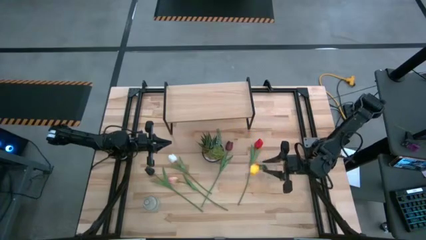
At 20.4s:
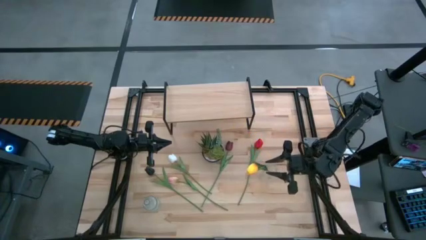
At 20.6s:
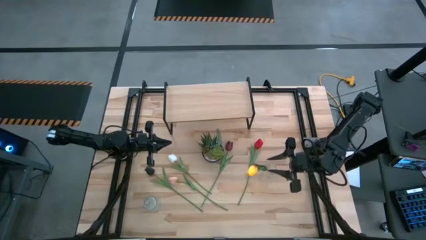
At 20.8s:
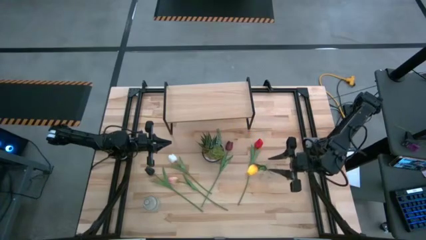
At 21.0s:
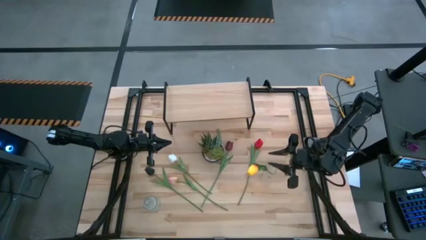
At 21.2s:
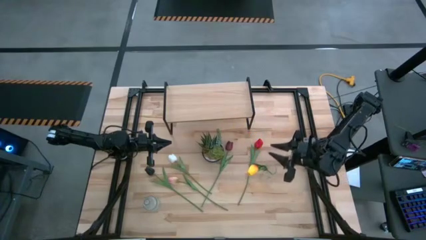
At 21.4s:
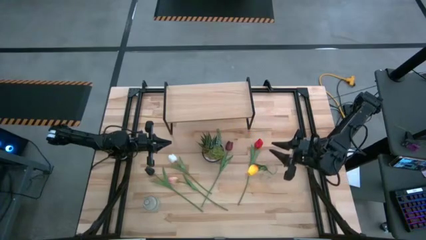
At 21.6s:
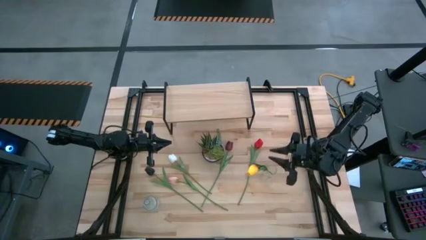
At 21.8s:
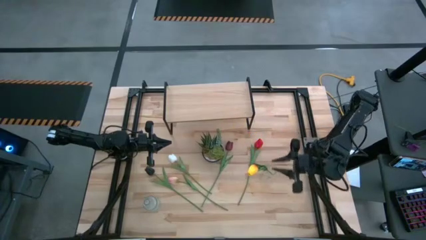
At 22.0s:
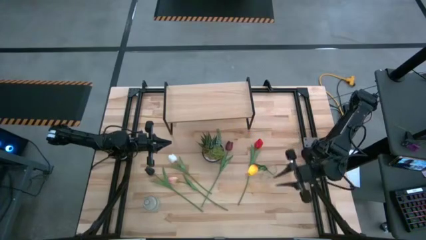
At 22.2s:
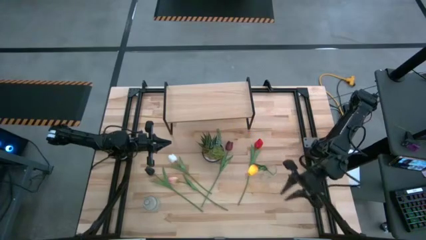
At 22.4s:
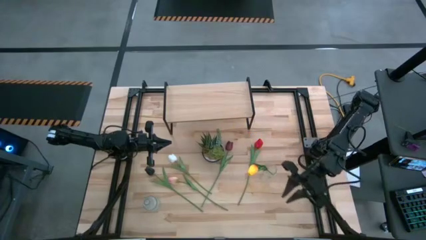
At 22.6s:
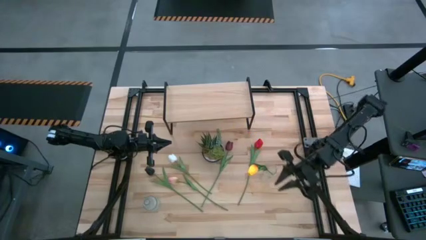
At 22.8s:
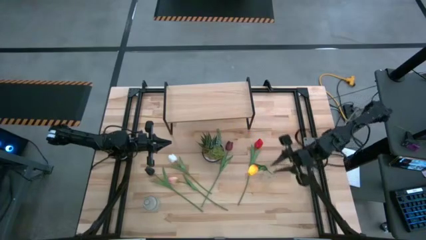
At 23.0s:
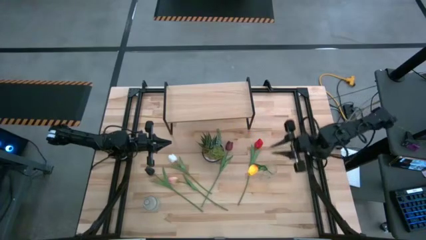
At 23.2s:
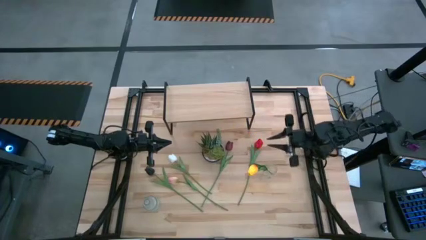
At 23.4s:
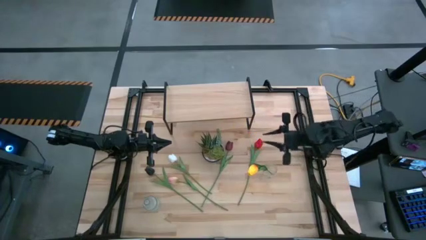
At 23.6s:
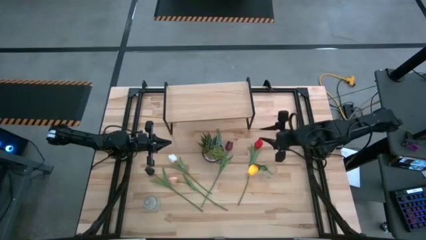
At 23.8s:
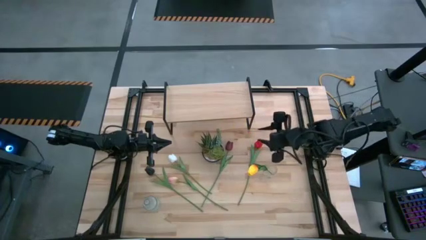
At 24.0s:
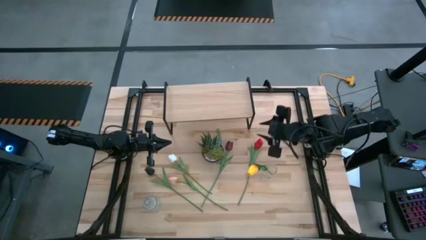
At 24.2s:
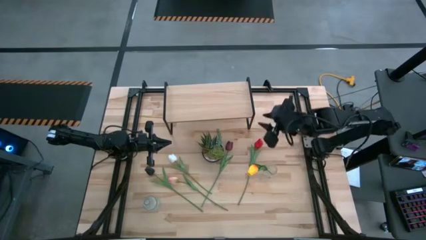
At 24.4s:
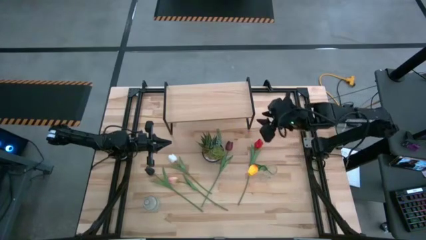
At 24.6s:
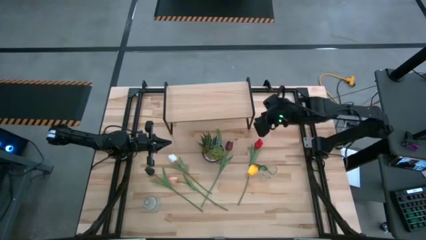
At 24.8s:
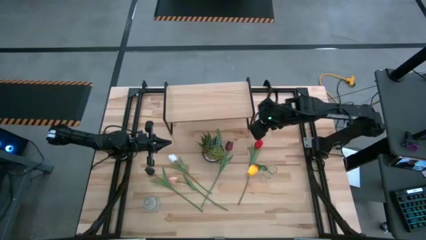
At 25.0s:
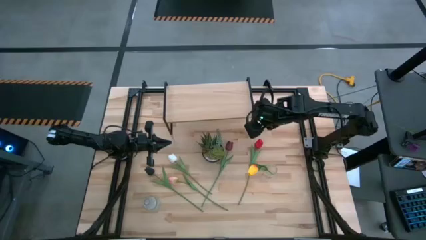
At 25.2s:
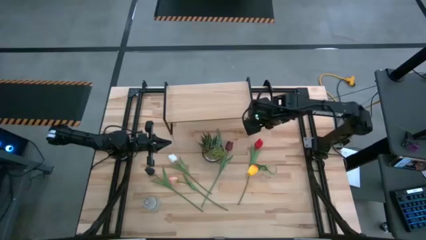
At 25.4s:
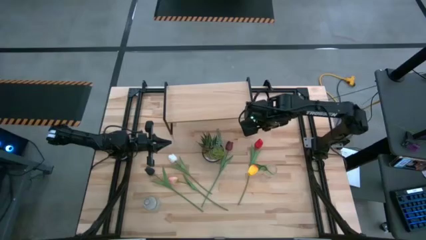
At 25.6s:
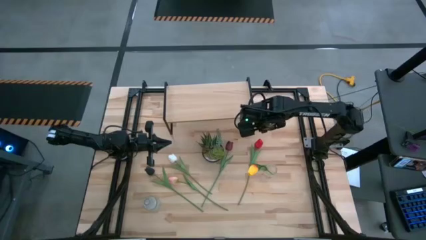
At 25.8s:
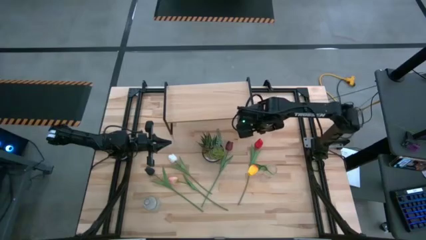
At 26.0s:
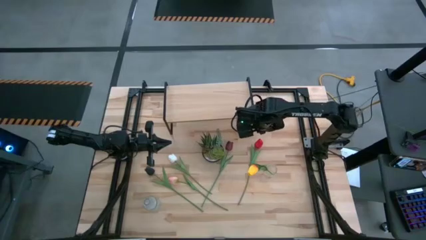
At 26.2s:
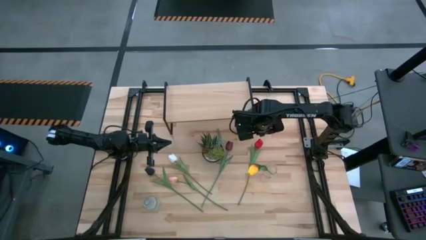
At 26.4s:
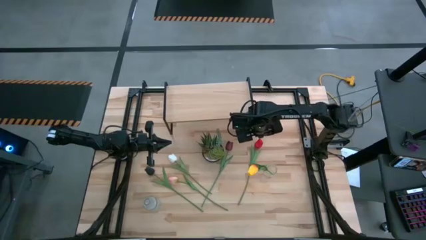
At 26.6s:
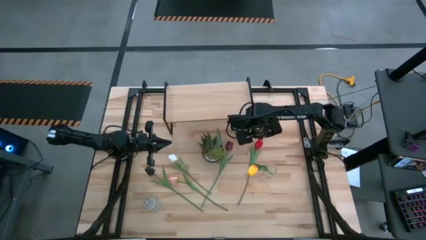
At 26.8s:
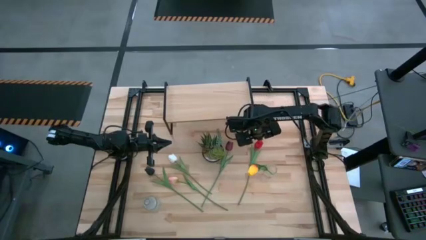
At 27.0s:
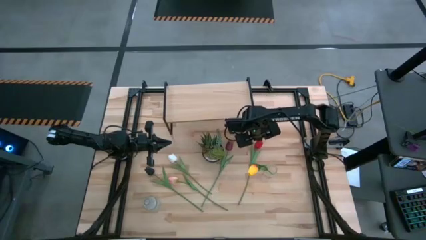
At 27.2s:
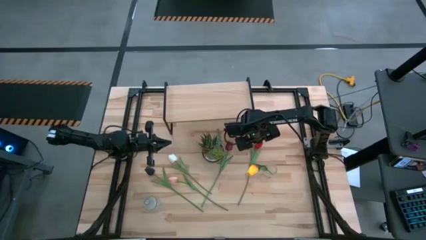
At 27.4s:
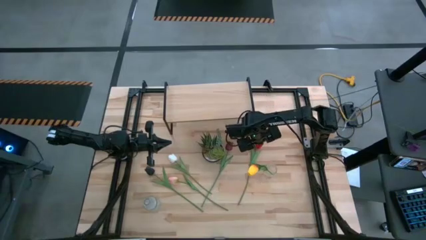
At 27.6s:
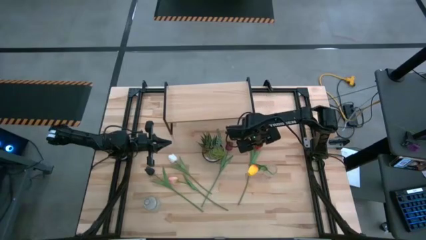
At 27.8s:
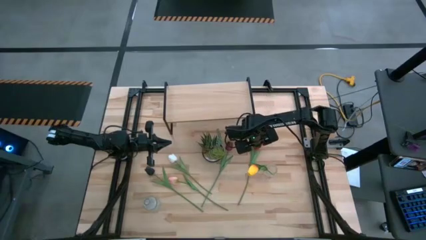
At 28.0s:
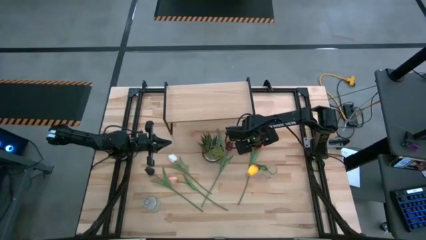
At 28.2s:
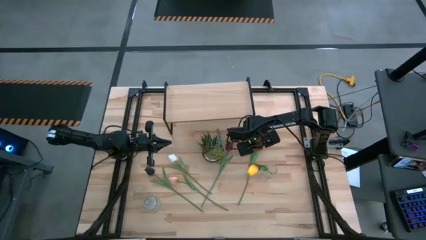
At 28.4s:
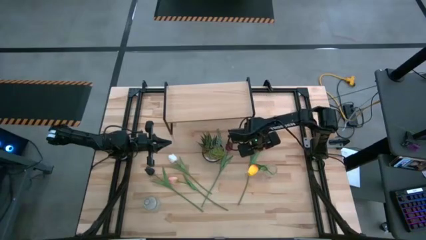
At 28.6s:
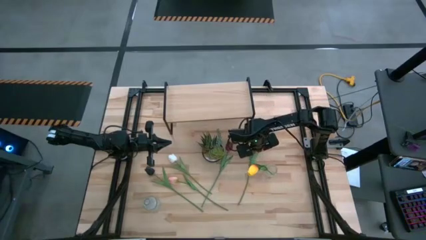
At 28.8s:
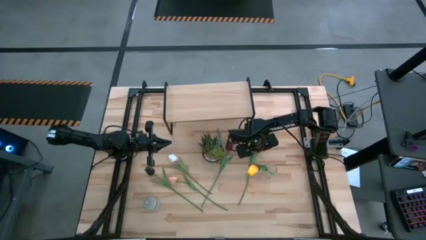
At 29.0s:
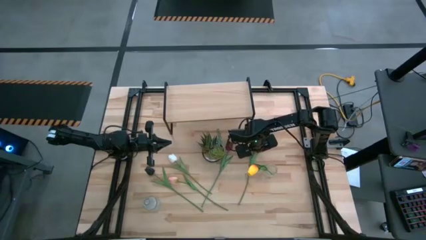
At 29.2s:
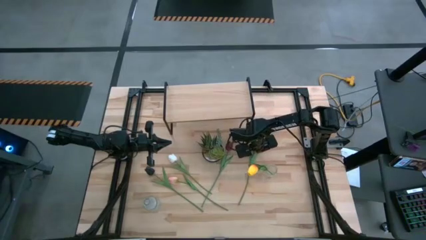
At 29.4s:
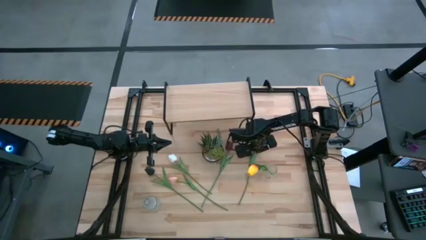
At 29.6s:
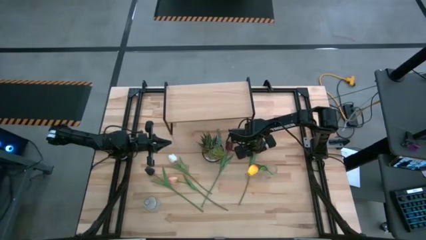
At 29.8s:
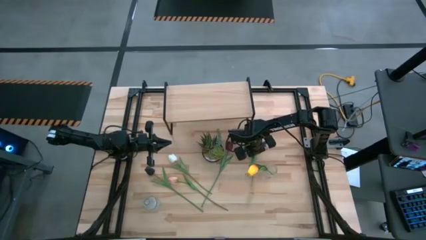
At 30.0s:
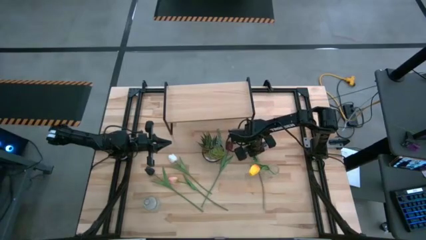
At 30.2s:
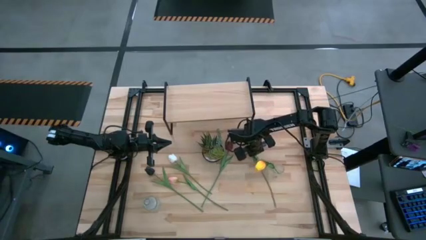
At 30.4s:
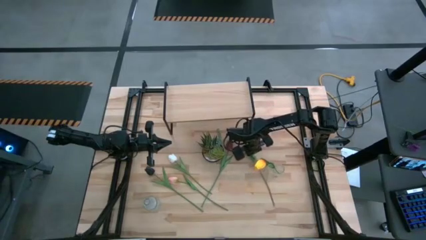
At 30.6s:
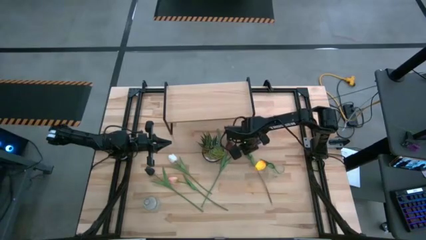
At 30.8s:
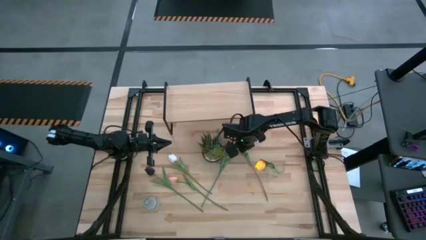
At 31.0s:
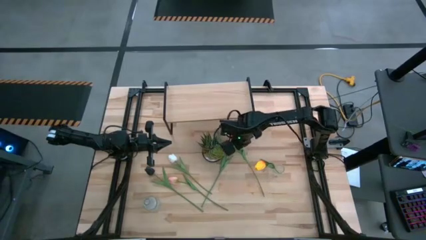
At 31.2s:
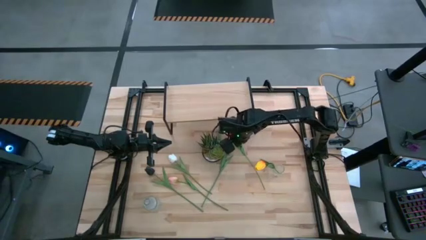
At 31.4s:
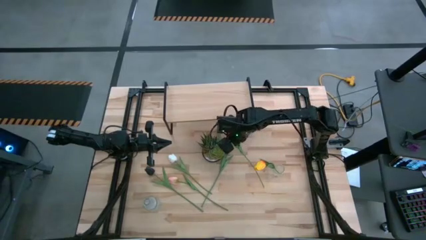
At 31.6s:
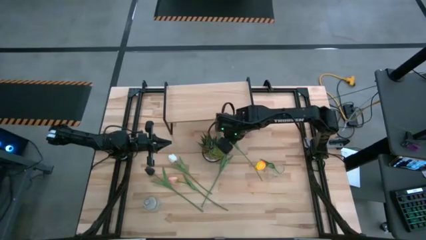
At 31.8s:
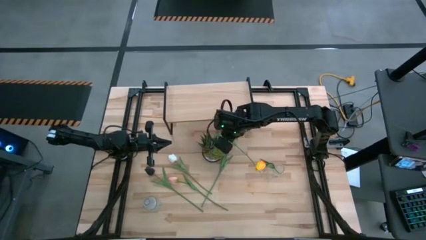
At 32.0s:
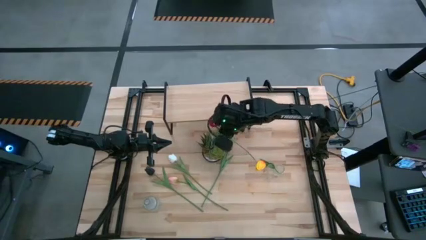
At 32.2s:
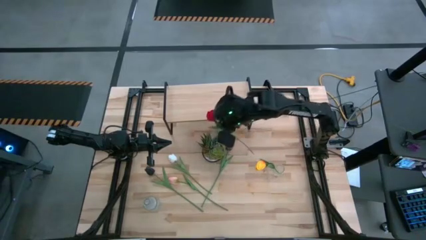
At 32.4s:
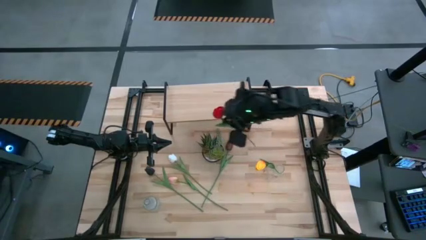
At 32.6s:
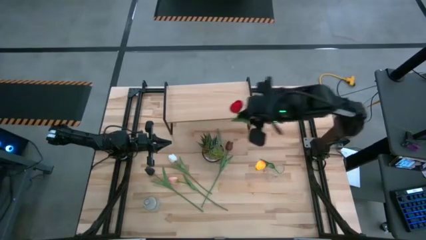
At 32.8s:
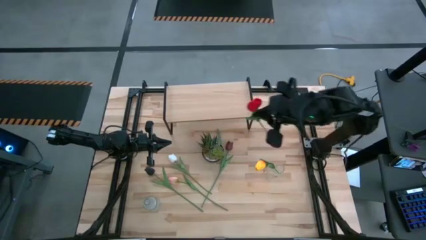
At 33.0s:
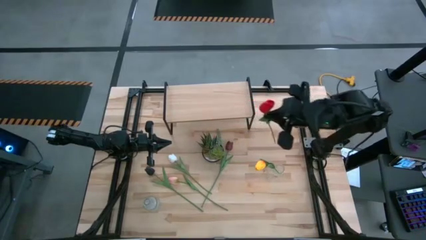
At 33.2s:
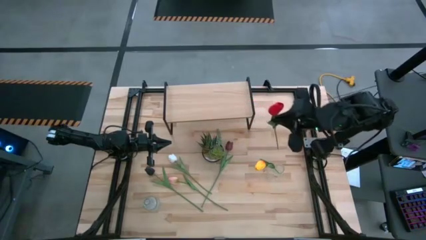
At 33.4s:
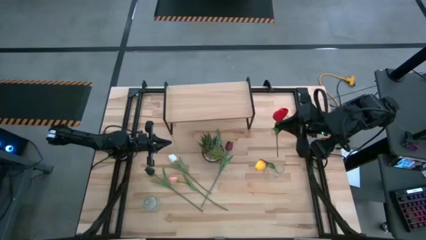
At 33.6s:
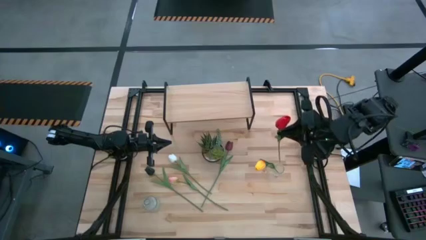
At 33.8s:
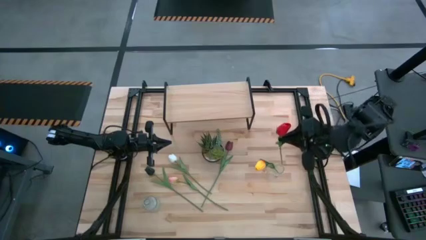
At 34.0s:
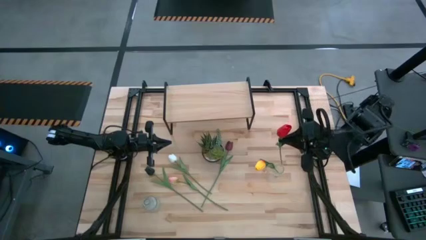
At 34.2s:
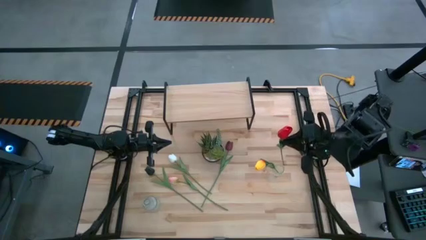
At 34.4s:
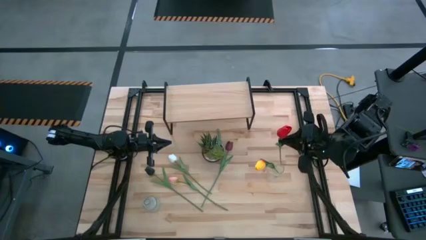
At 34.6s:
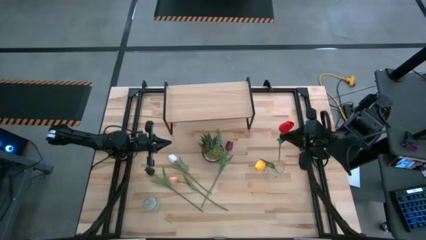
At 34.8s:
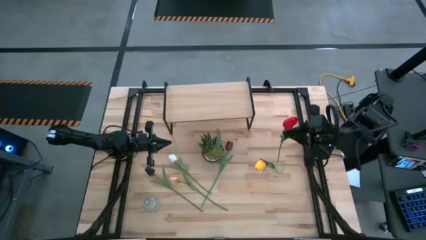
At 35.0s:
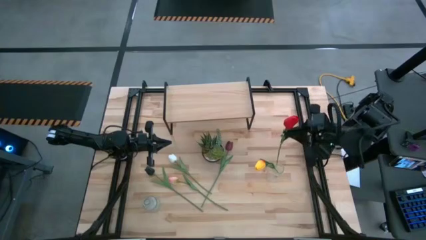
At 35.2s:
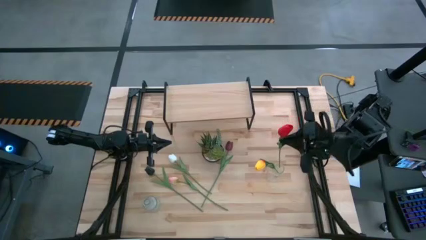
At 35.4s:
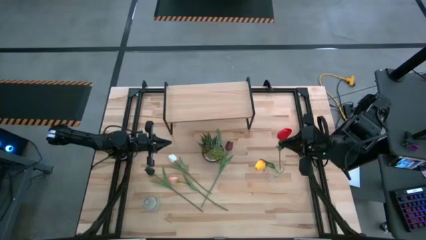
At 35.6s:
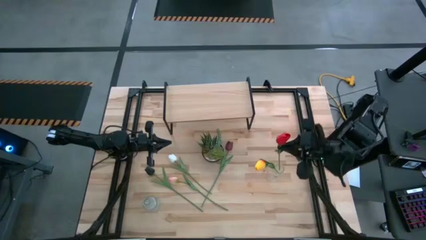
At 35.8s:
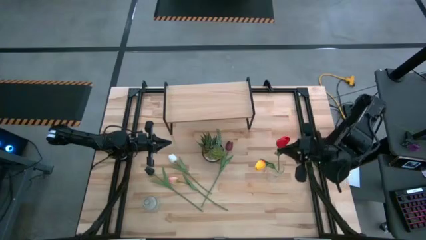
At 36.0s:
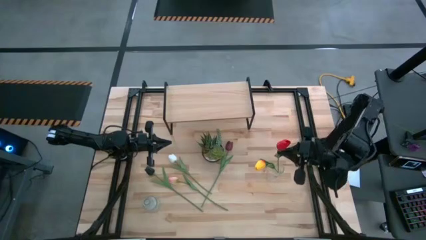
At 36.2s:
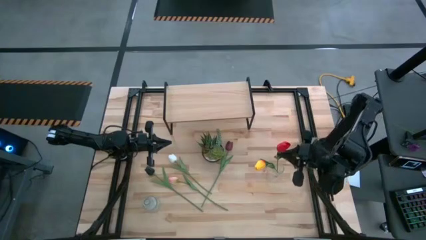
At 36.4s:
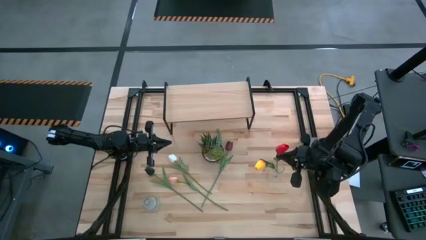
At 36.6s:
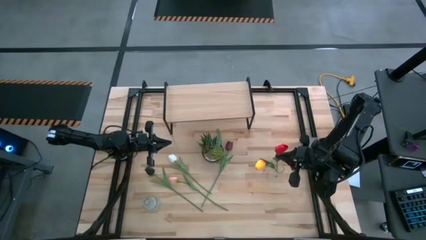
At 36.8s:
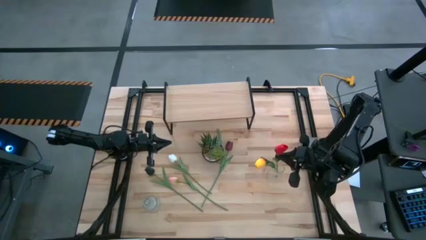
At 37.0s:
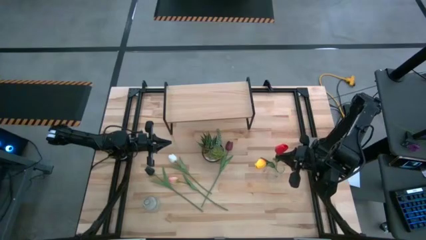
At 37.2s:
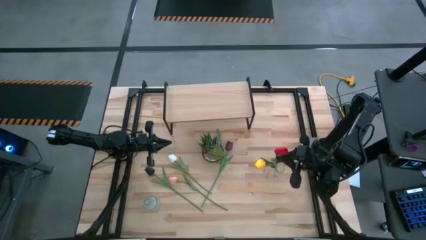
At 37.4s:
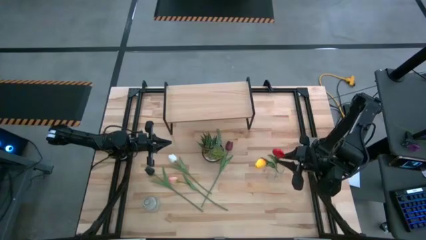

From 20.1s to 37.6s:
Task: Pick and place flowers into a vace then onto a shelf
Put the red flower into the right transparent vase
